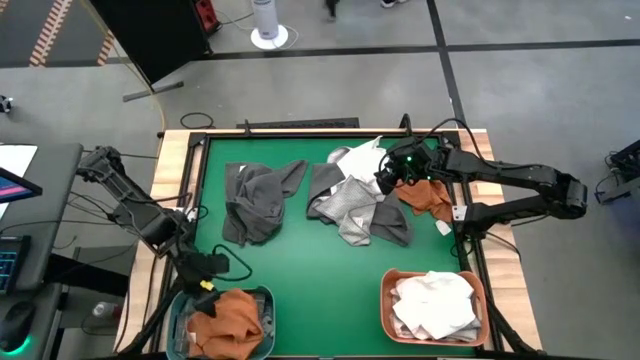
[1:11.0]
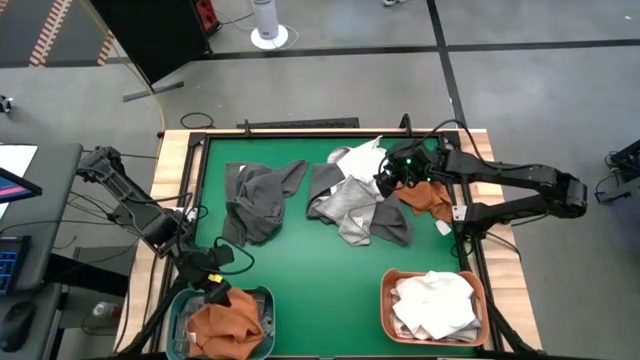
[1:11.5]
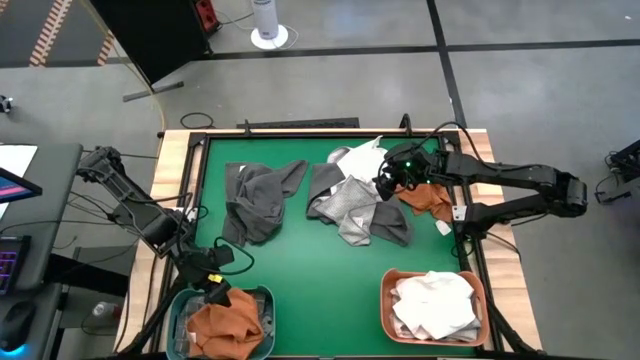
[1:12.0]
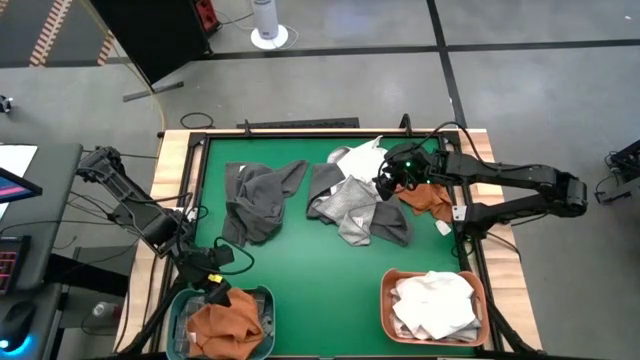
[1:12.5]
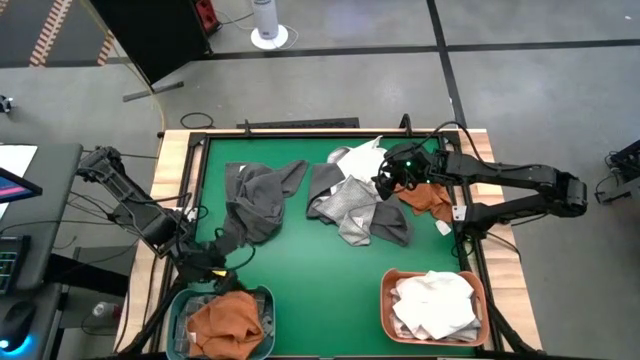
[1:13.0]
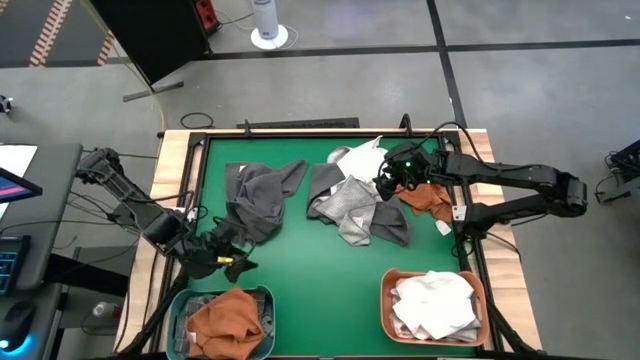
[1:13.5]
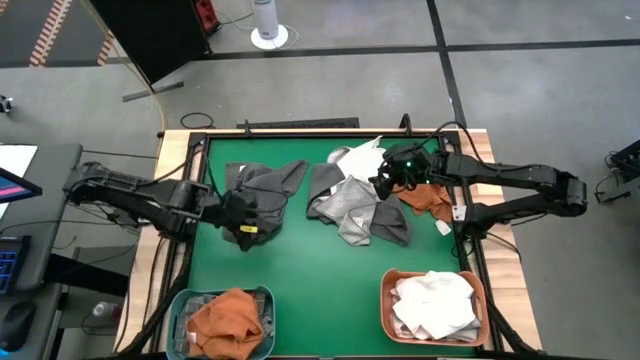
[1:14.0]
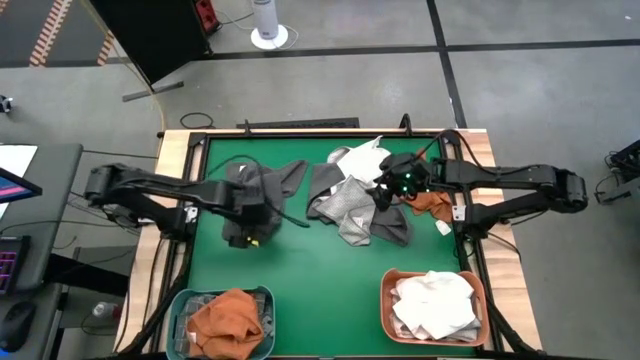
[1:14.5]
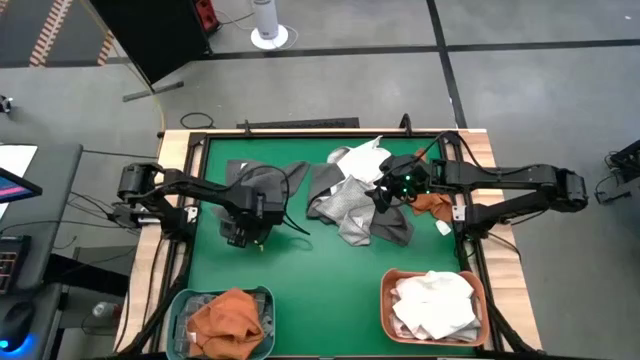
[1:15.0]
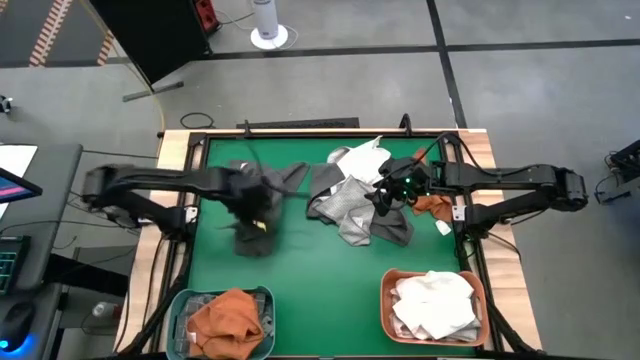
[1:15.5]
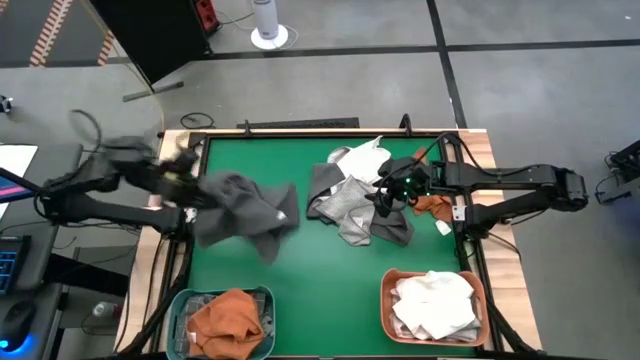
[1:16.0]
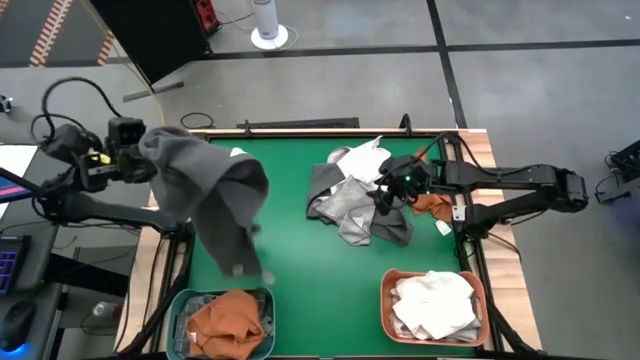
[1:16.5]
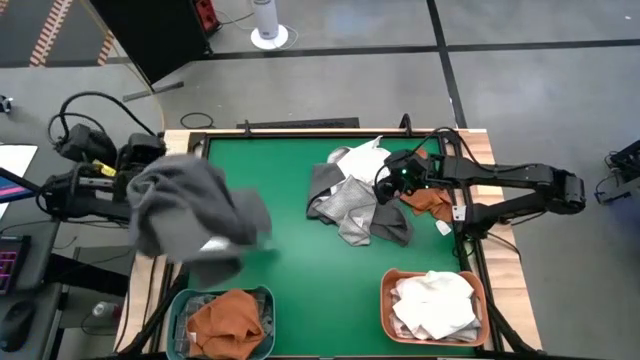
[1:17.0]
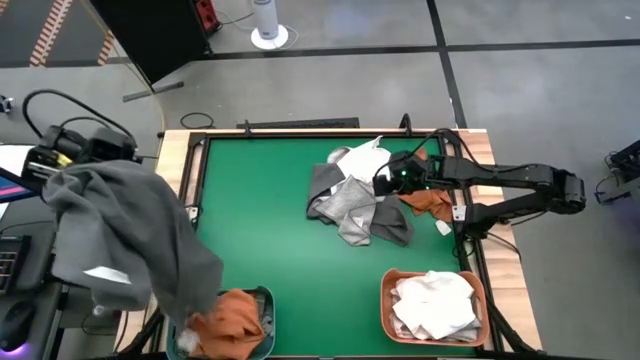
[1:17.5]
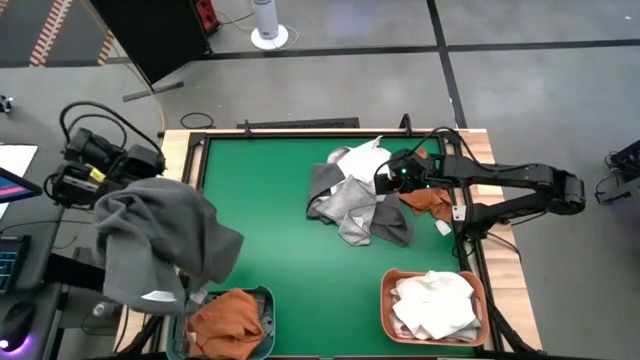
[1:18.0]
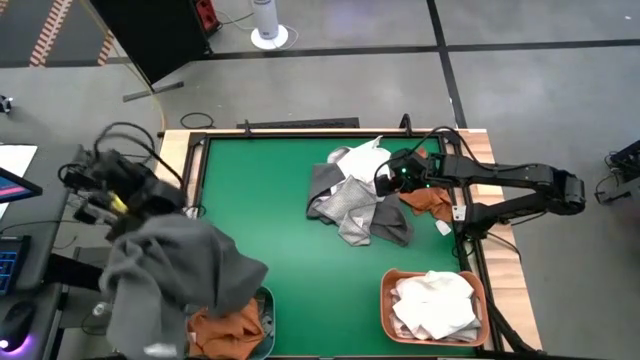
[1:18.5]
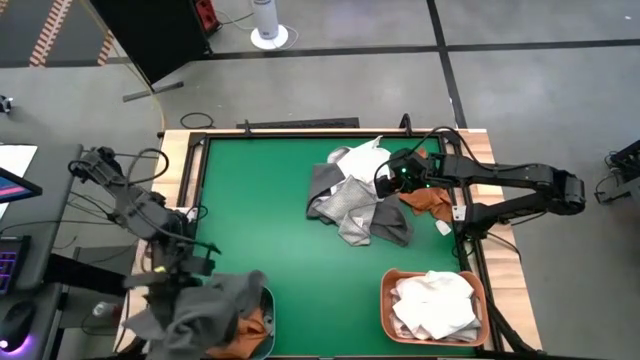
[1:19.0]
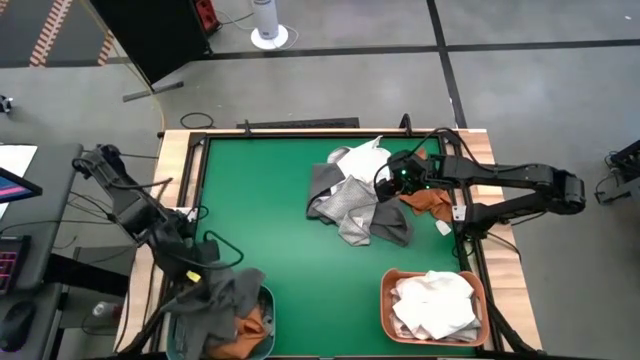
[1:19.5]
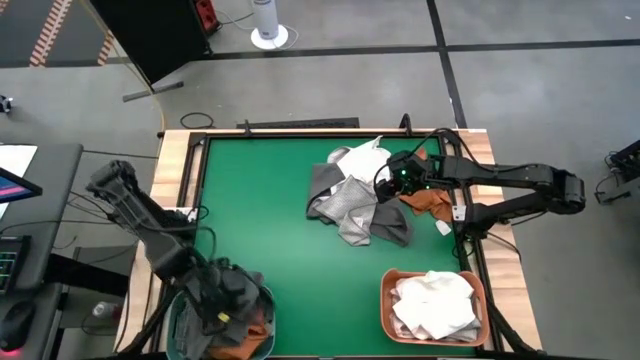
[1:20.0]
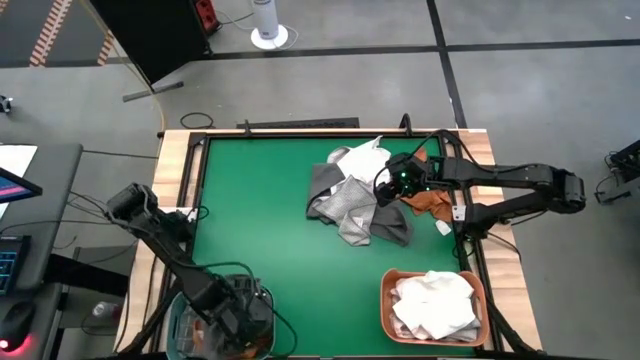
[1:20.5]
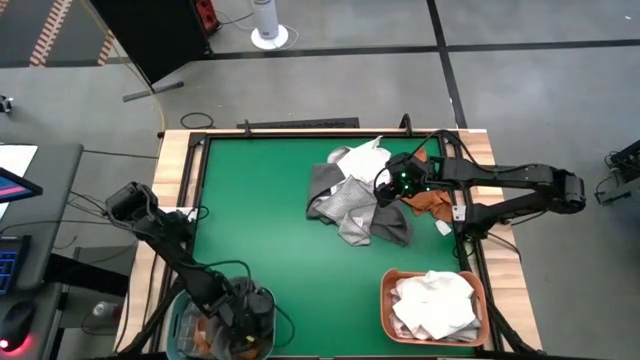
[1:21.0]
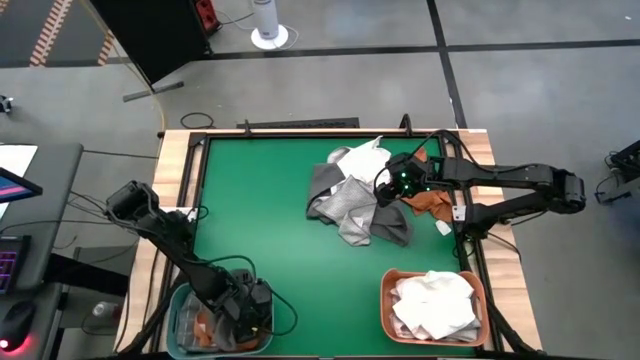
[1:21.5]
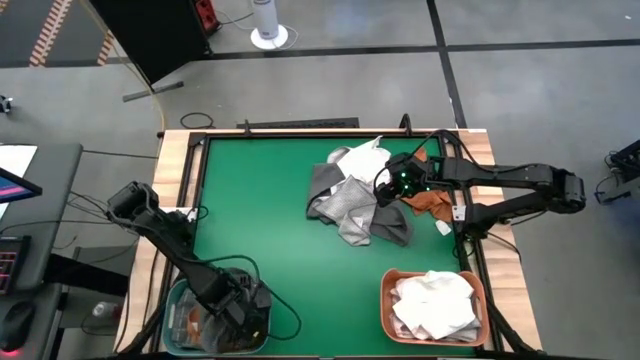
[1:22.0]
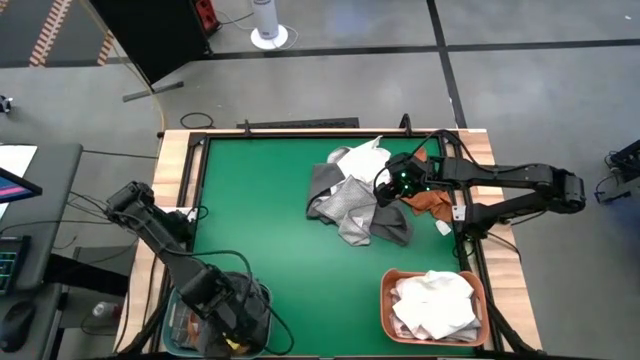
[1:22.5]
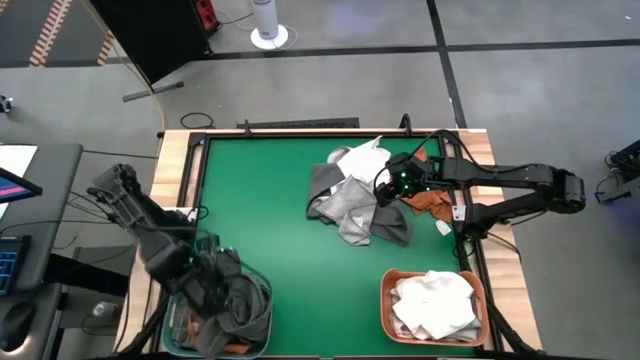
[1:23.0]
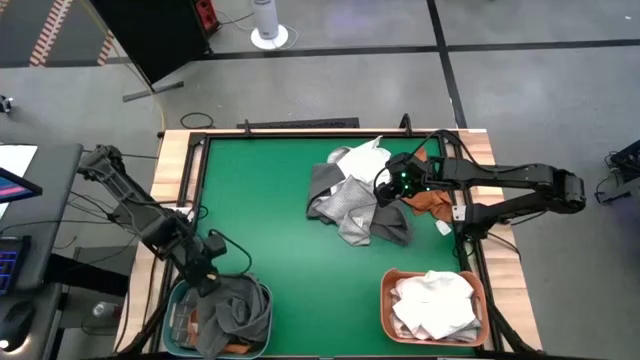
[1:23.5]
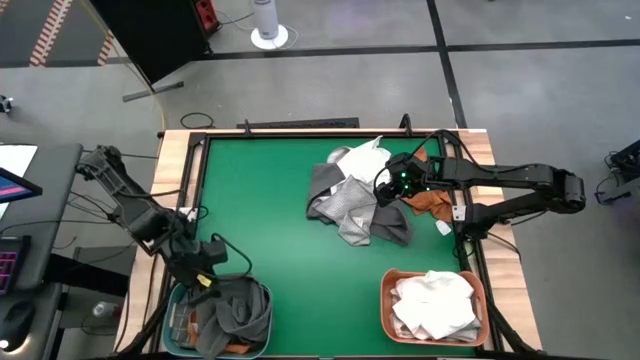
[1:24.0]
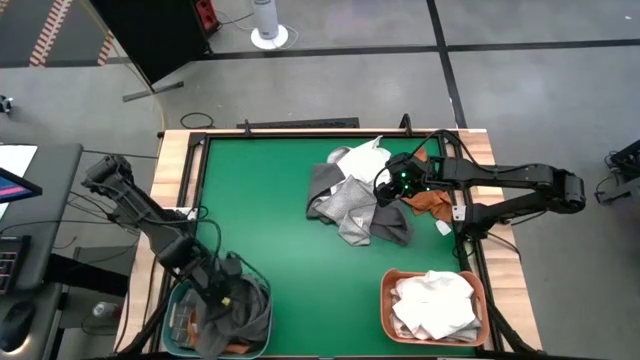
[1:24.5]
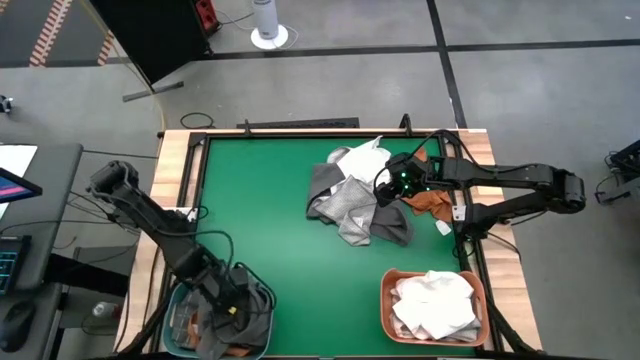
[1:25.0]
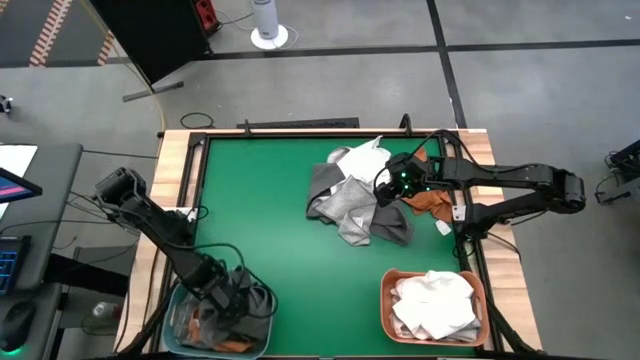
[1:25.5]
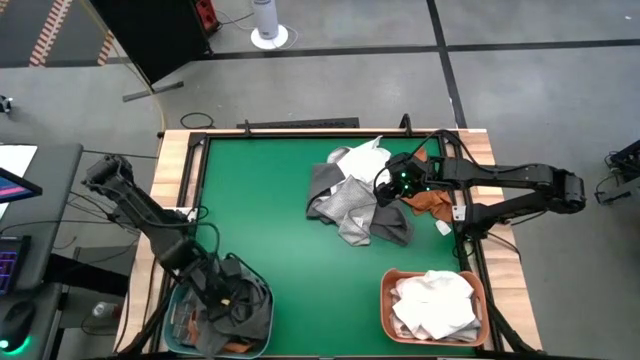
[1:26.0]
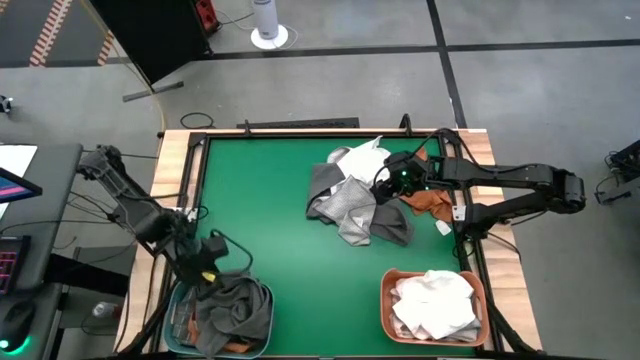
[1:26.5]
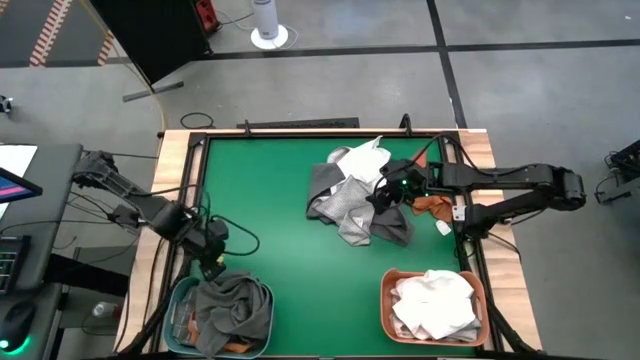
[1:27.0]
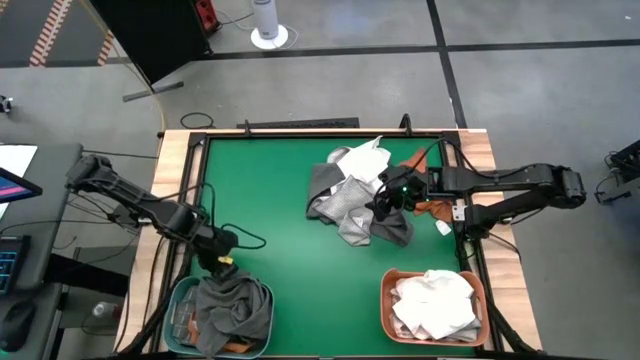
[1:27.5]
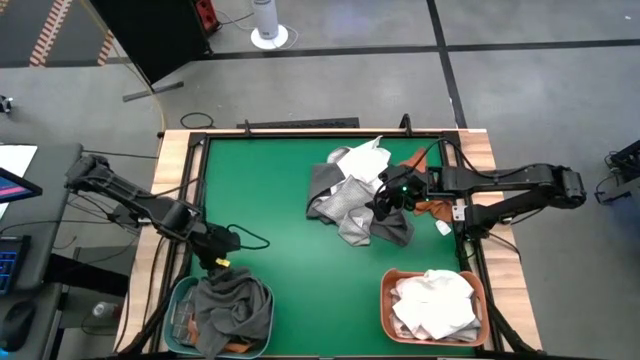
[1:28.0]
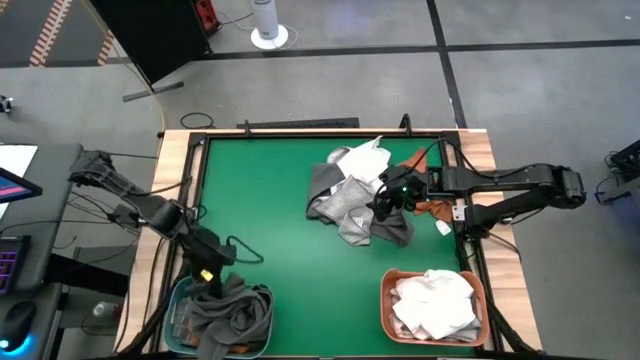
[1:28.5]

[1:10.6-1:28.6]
Task: Sort towels by color in basket
Put the left gray towel into the green bin
